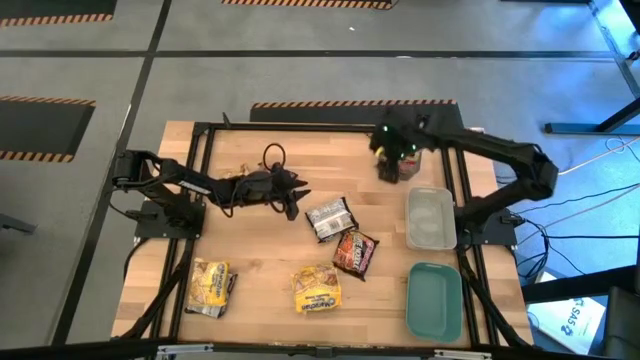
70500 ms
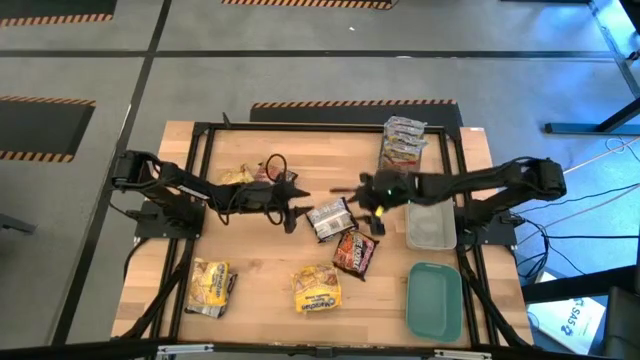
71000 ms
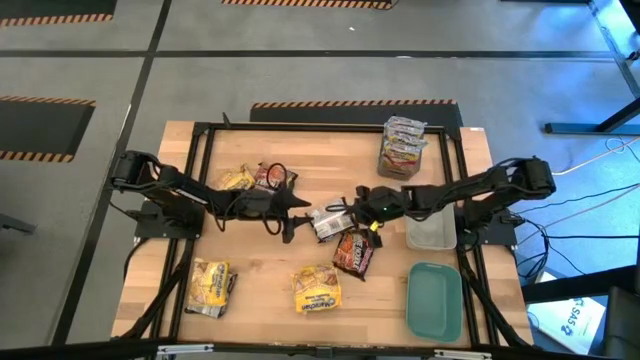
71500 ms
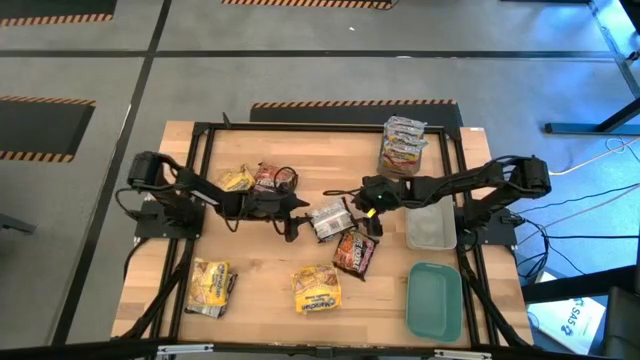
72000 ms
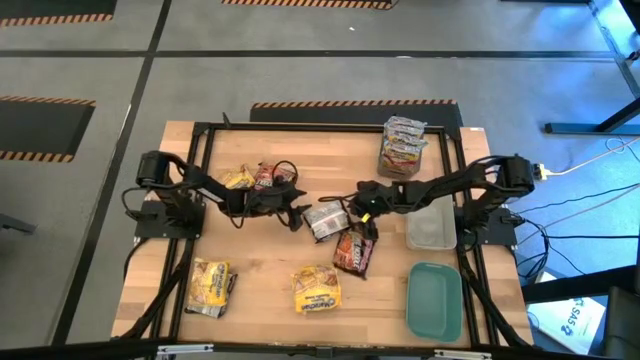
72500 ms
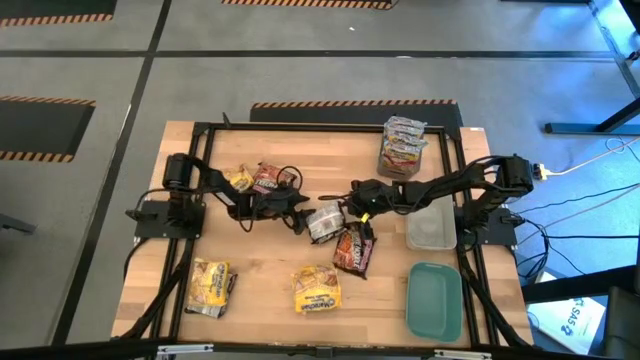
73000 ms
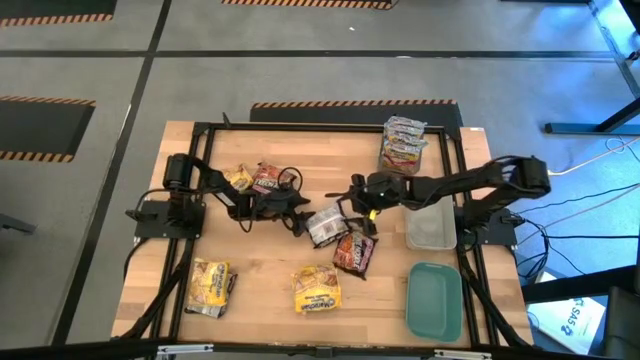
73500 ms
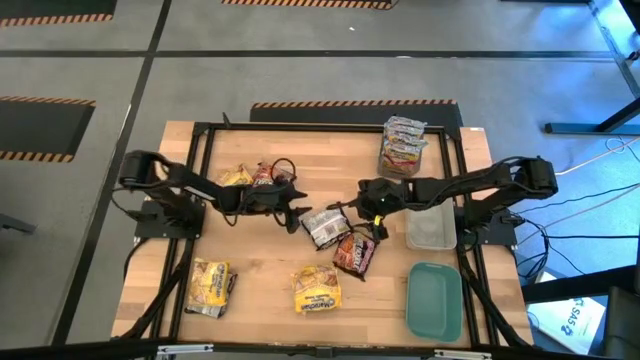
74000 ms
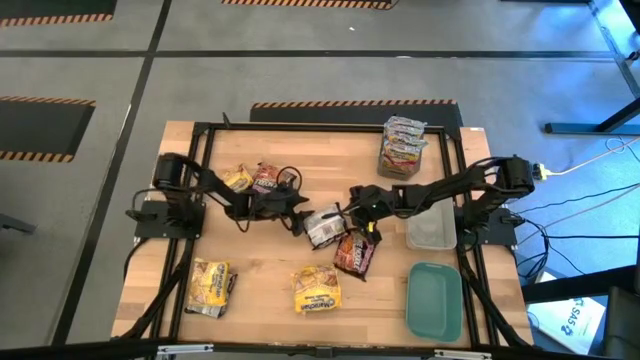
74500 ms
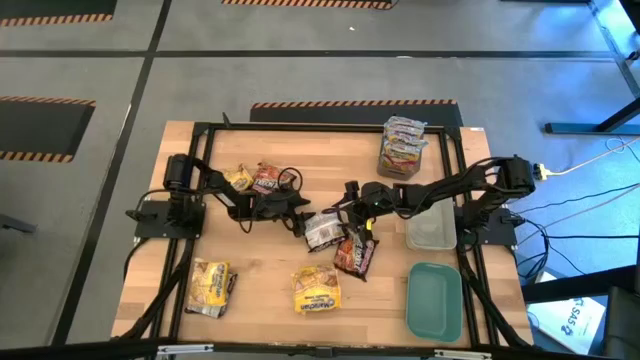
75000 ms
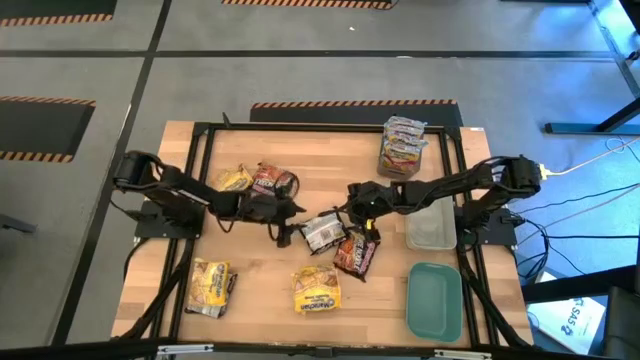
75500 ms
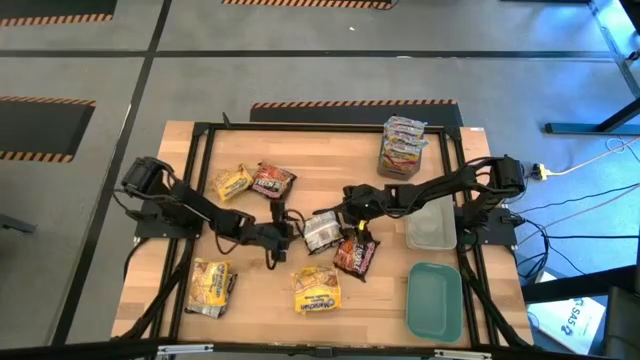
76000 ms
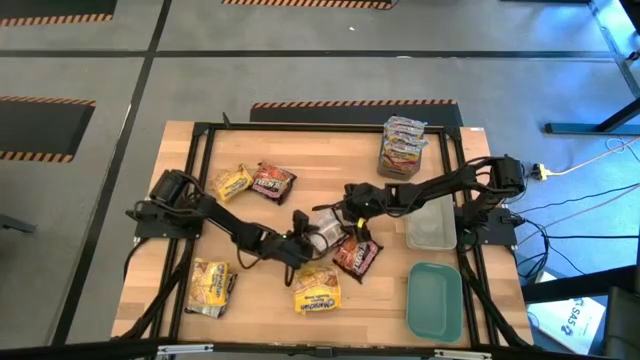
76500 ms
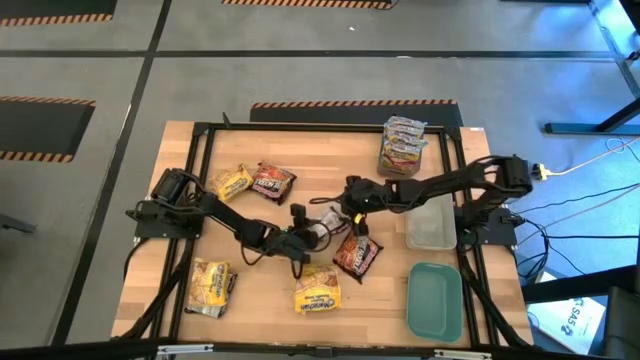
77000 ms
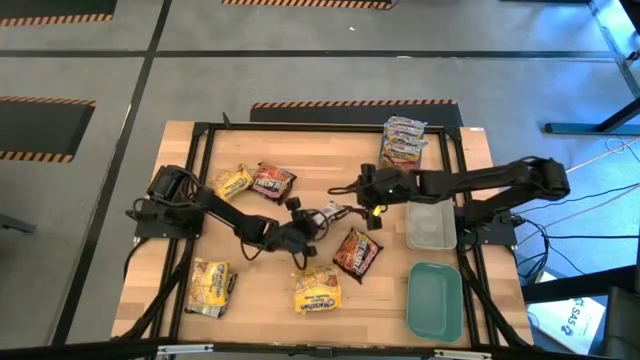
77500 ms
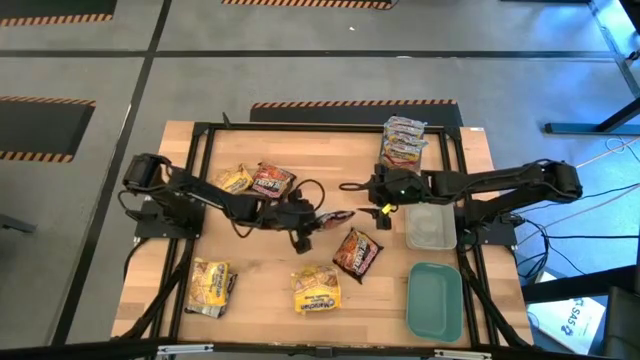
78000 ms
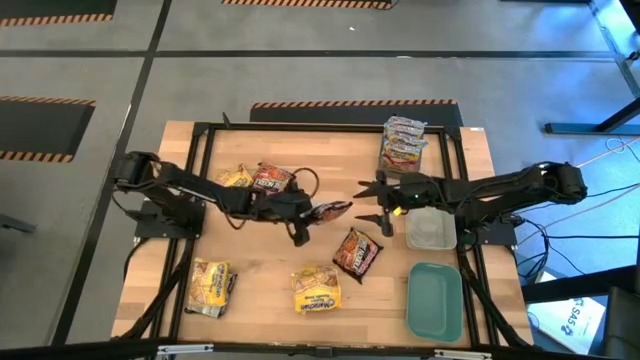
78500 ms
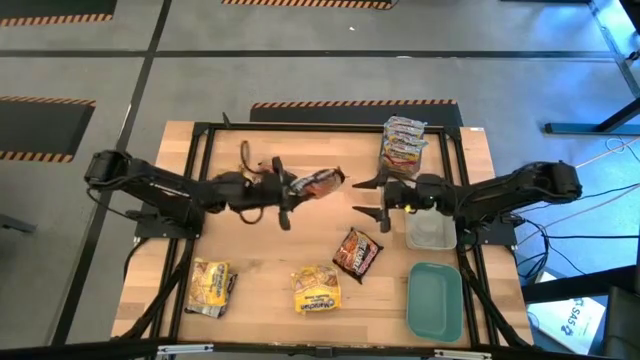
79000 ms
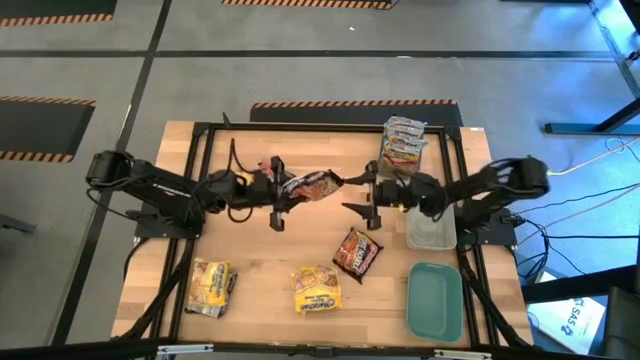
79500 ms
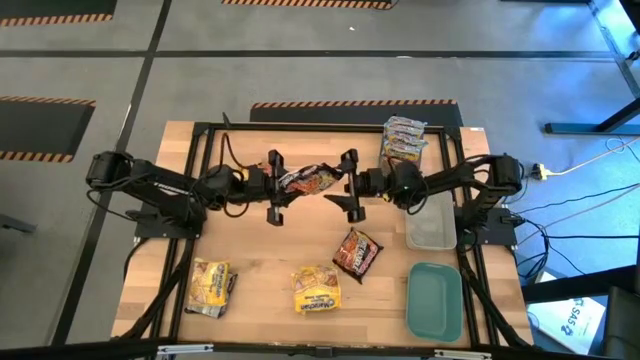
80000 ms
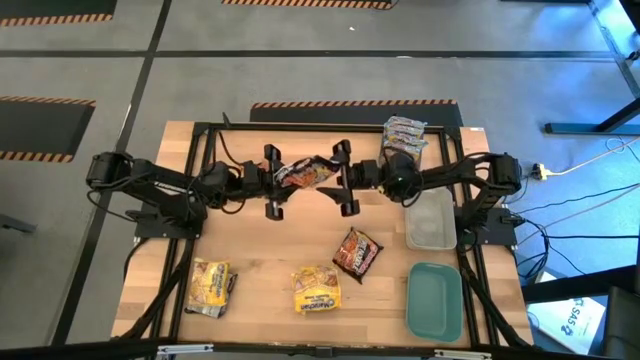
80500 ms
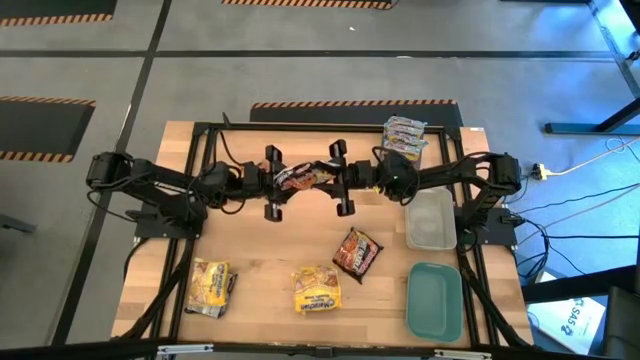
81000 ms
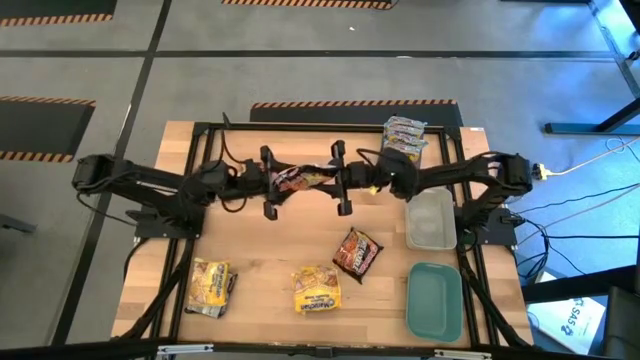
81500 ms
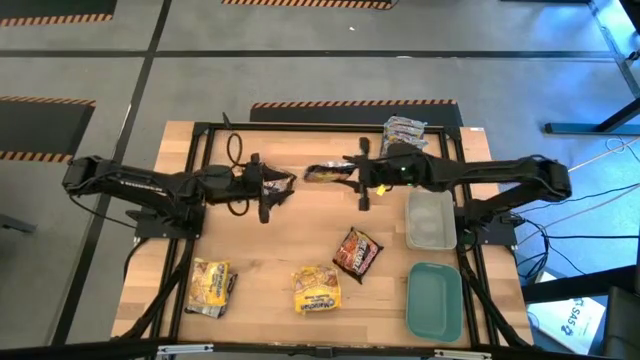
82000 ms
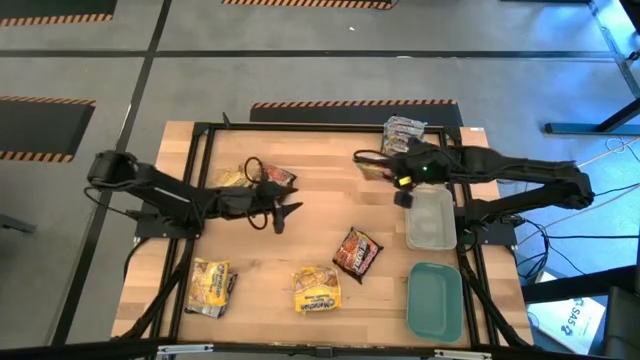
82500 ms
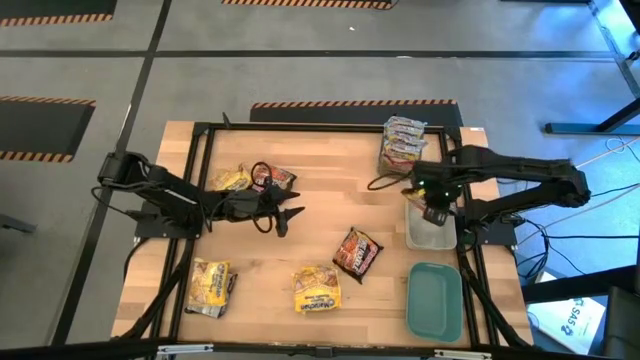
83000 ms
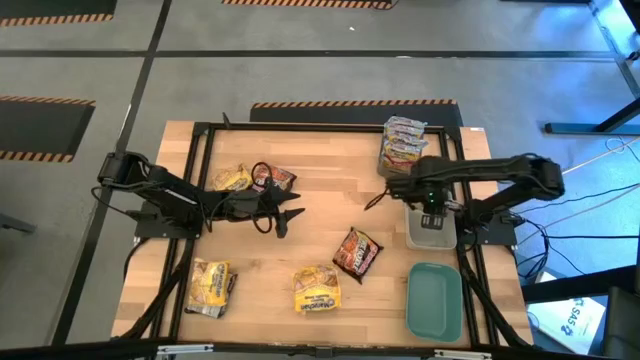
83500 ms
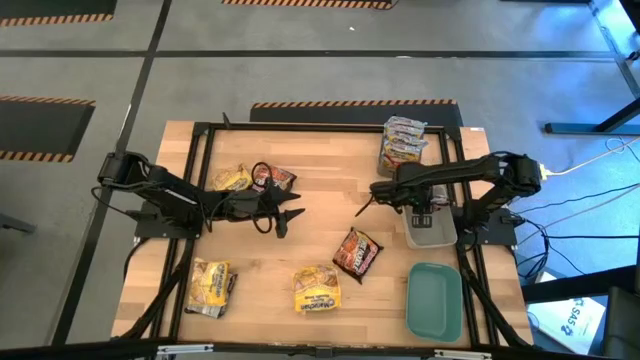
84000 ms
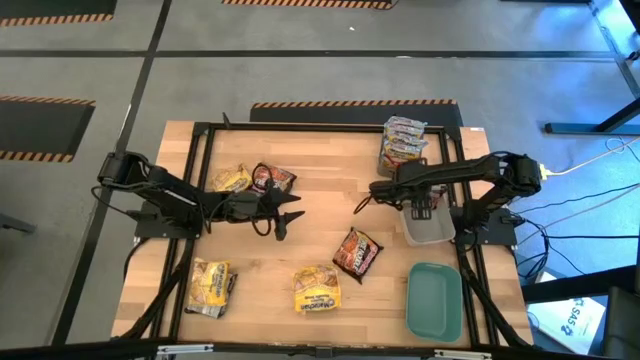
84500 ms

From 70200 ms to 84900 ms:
Task: Sort Maruchan noodles
Put the black noodle pack into the gray bin

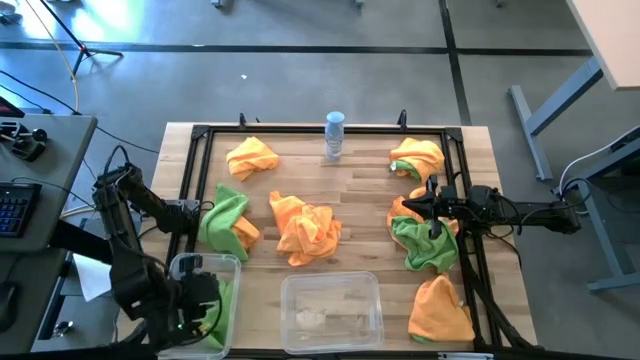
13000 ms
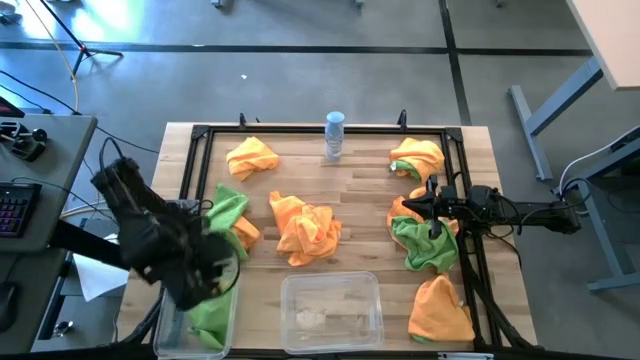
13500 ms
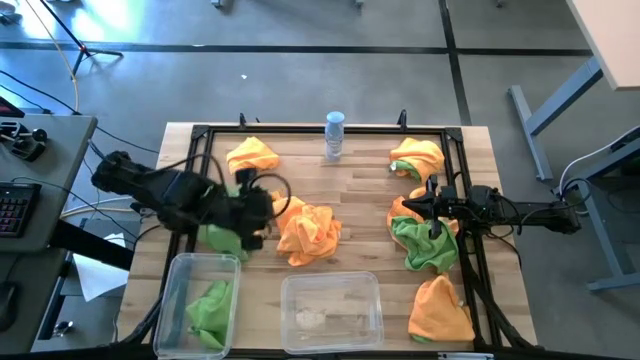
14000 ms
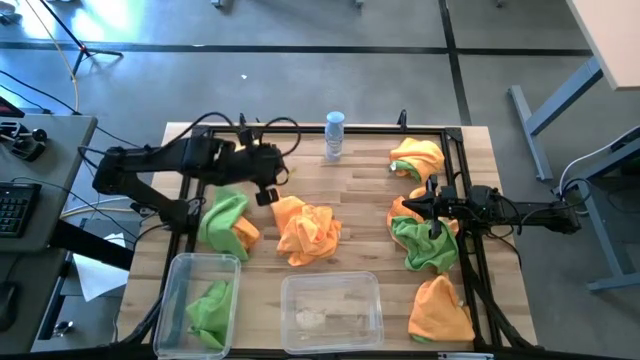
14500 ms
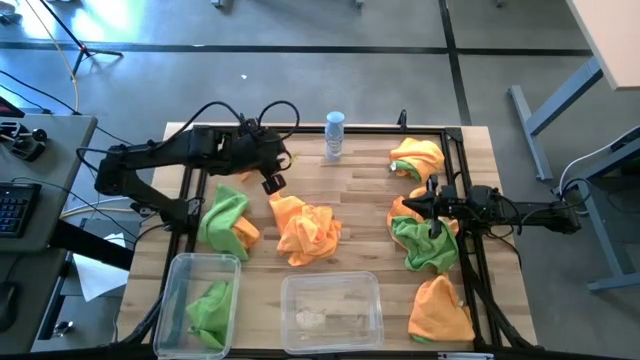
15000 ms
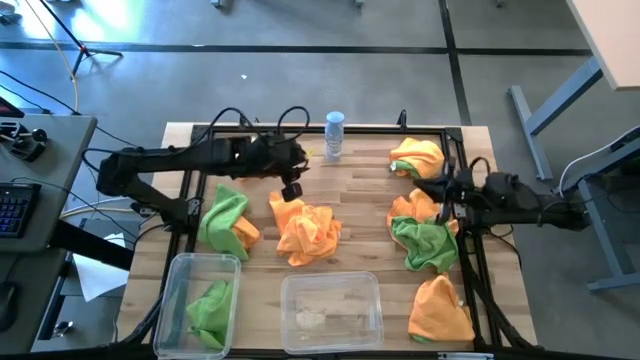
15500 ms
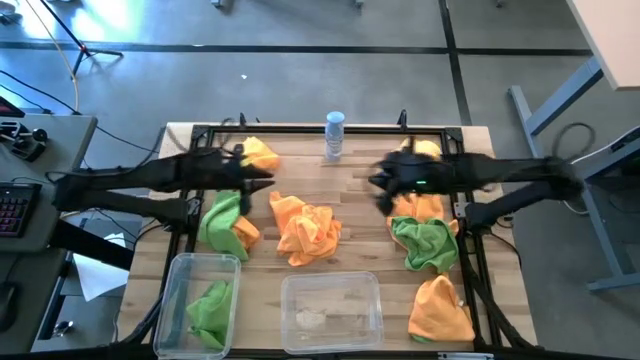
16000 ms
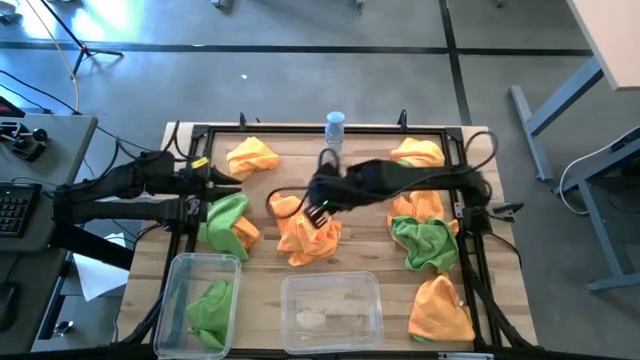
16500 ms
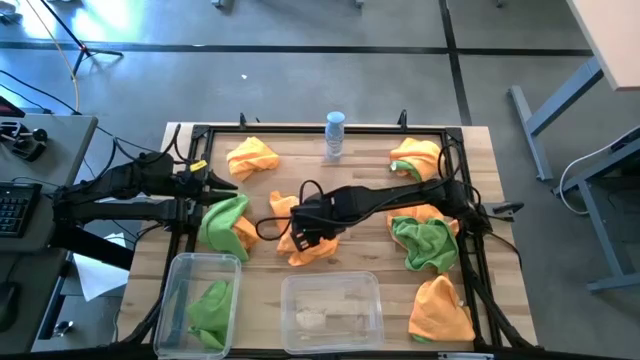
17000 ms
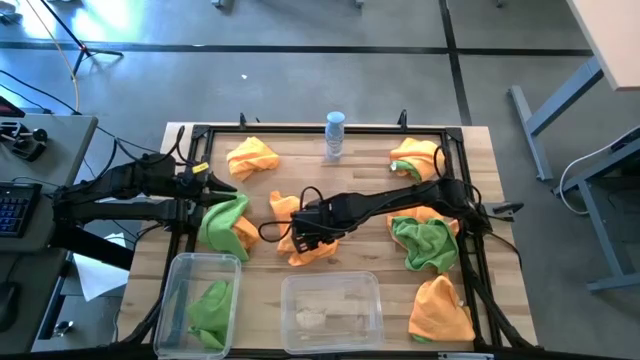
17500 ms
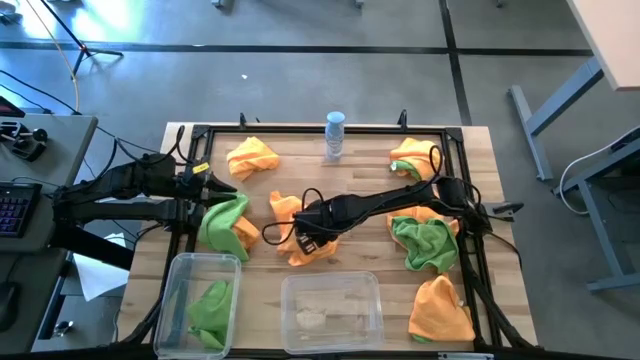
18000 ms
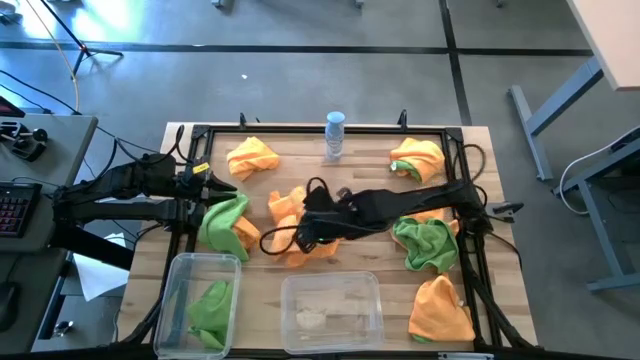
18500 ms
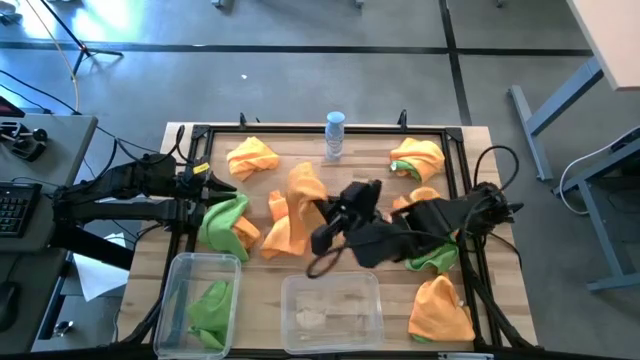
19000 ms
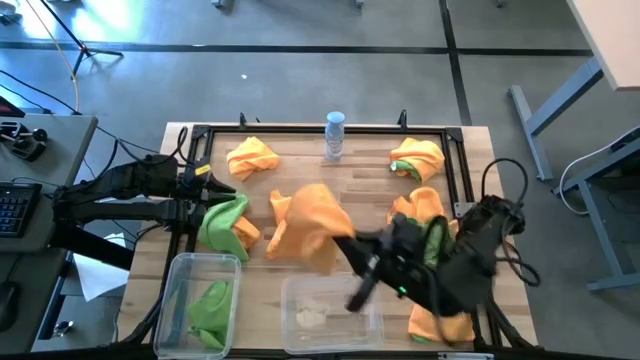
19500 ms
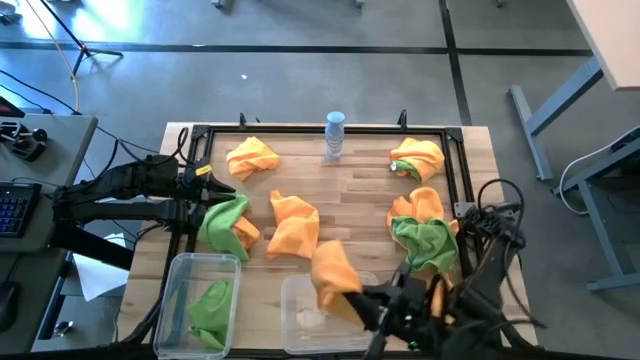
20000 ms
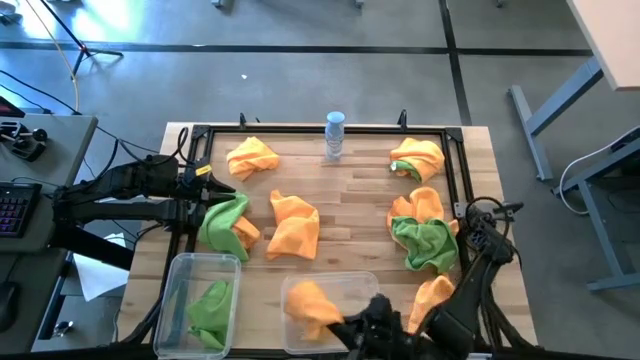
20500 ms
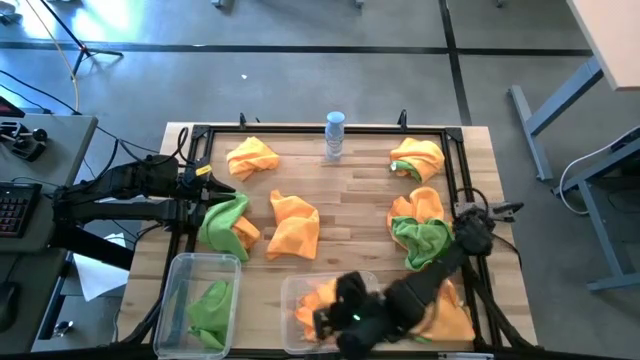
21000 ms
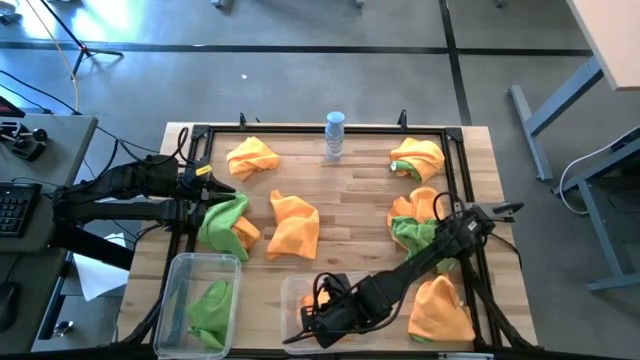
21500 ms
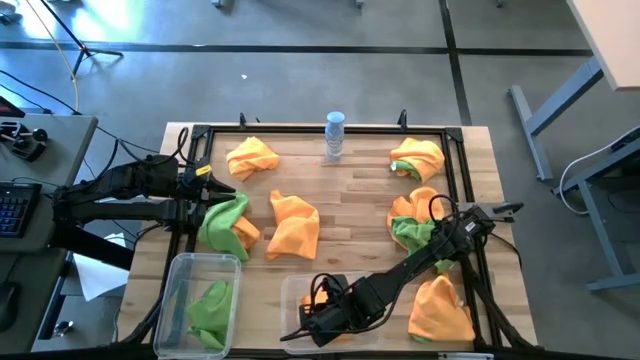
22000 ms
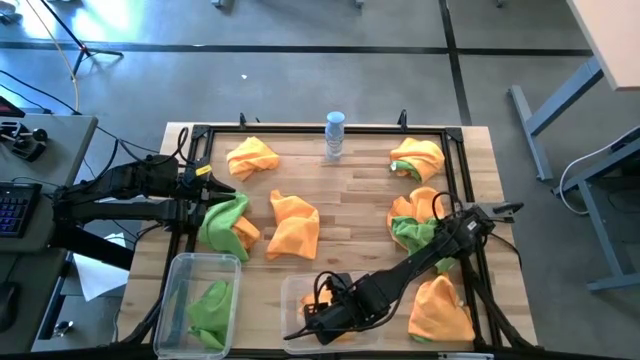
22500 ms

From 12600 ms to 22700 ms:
Task: Sort microfiber towel by color & place in baskets
Put the orange microfiber towel into the right transparent bin
